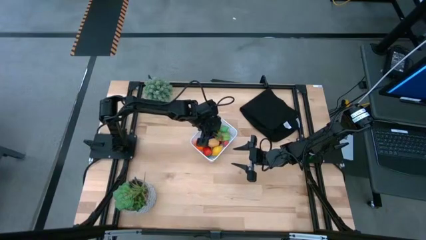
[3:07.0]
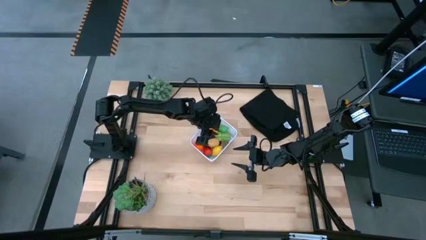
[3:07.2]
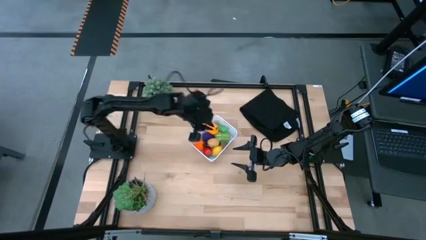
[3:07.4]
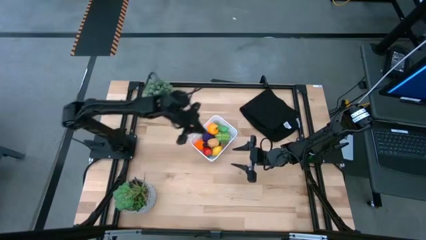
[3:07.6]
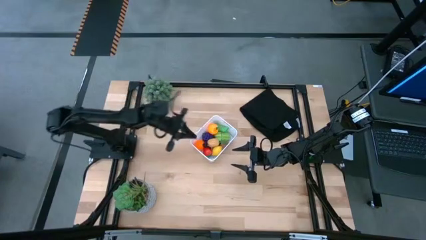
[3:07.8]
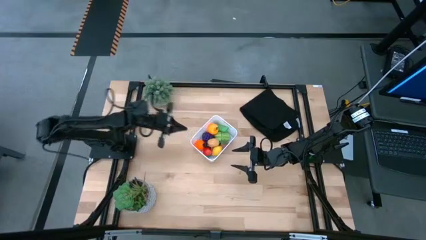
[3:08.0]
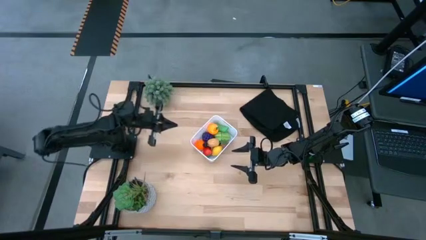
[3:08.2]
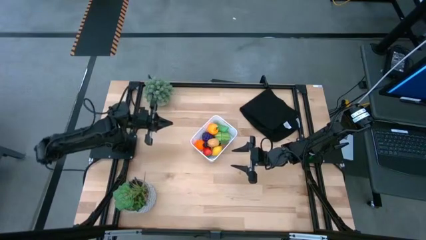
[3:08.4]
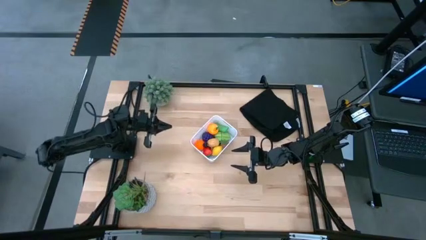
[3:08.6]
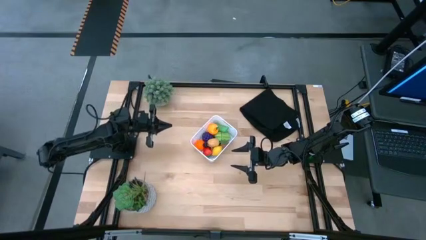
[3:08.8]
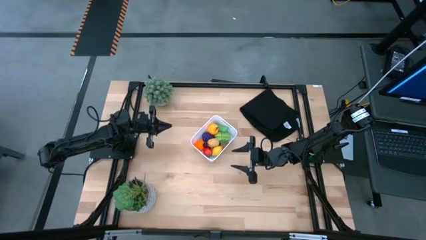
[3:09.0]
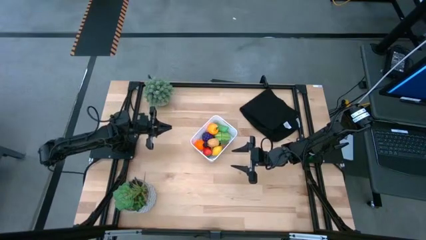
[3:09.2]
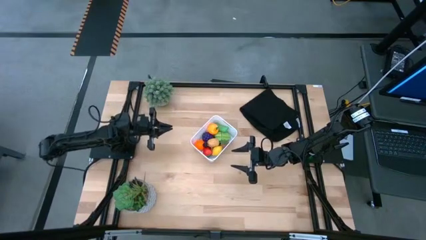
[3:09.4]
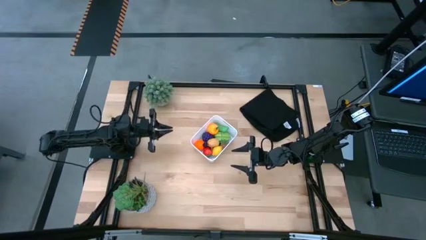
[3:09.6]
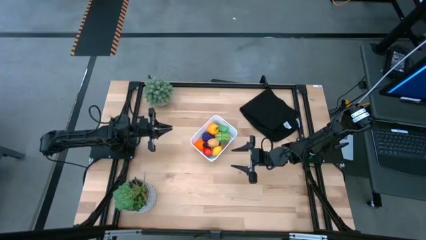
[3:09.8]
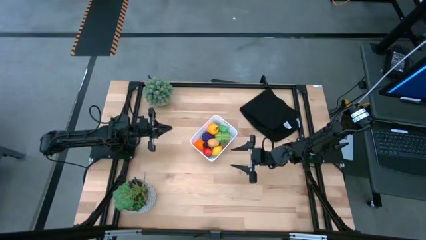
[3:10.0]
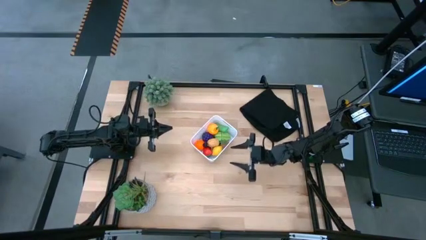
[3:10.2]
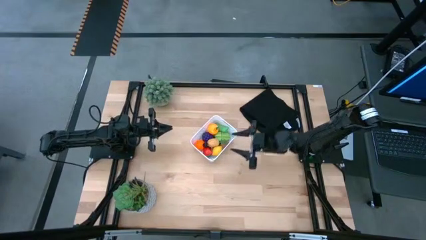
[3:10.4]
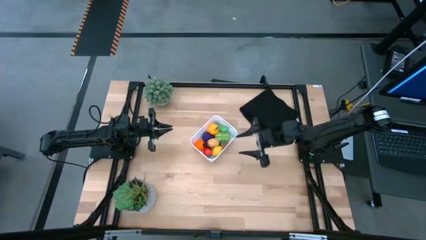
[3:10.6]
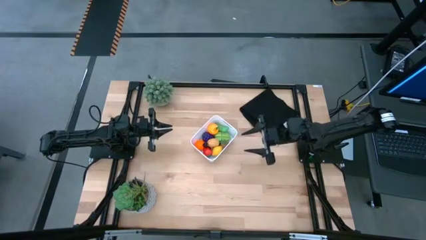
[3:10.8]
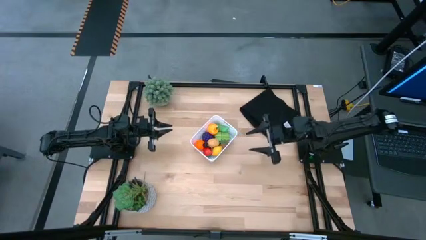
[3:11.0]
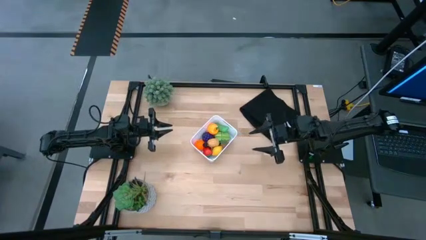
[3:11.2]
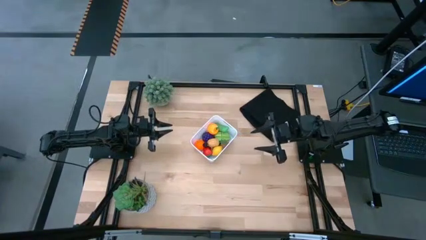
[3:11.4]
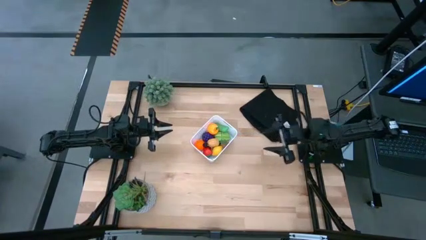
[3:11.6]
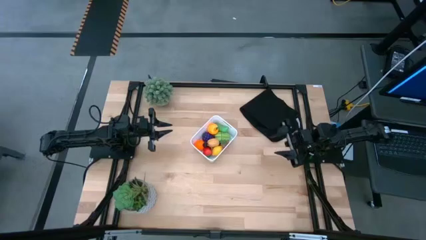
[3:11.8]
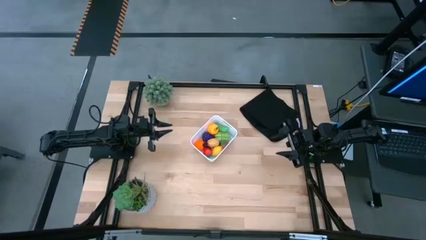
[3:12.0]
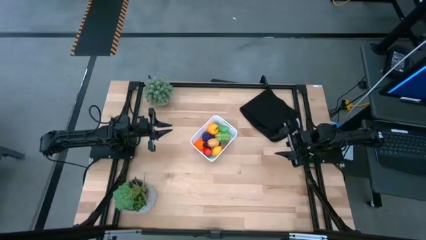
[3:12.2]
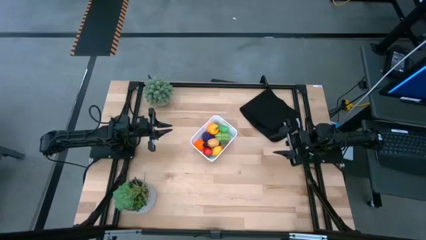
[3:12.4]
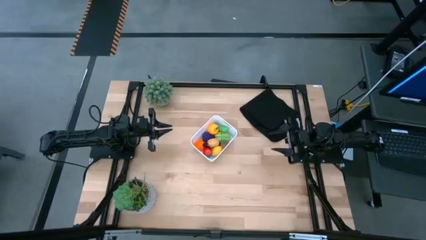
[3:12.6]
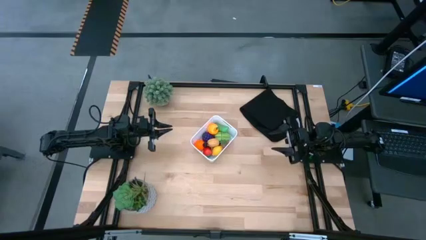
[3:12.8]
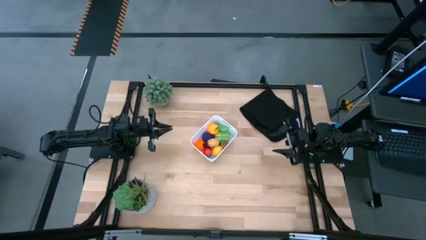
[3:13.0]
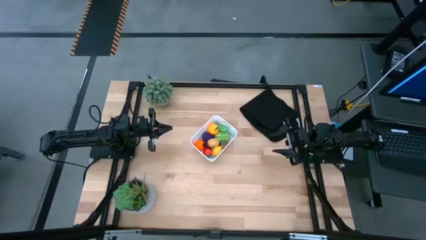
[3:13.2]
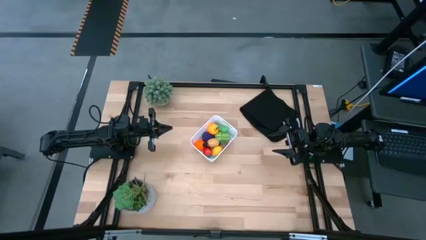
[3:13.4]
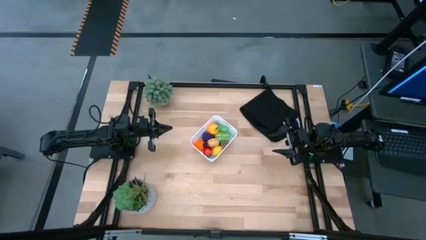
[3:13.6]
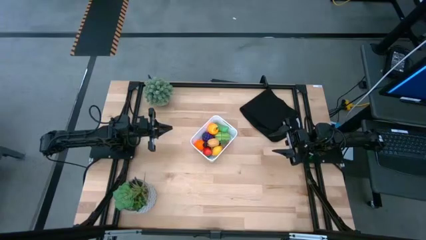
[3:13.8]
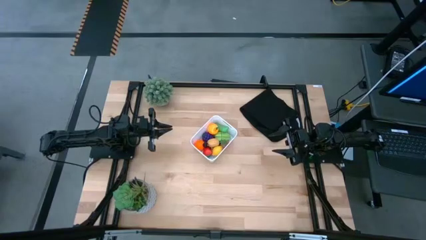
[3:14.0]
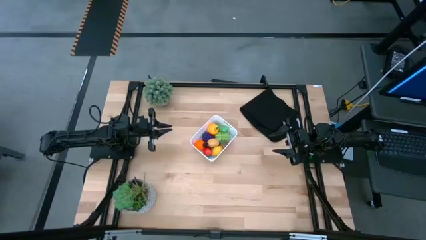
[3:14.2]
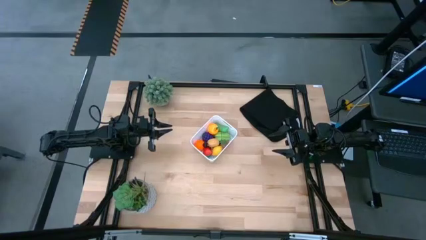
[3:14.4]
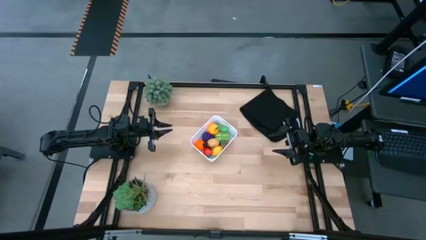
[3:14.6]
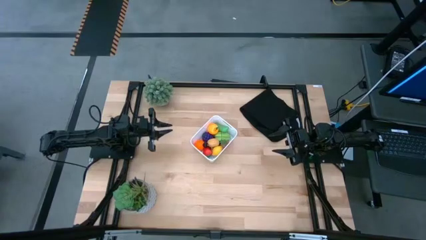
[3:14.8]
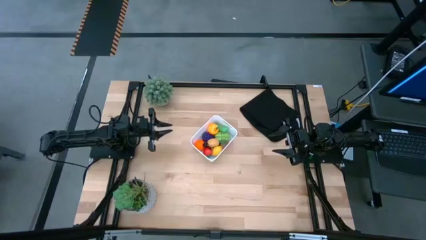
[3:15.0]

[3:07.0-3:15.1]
Task: Pick and placing Produce into tupperware
Return to Home Position

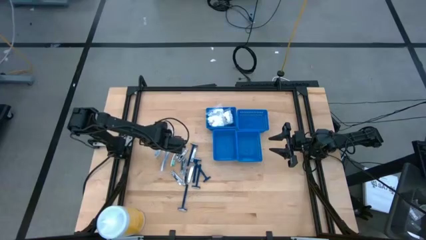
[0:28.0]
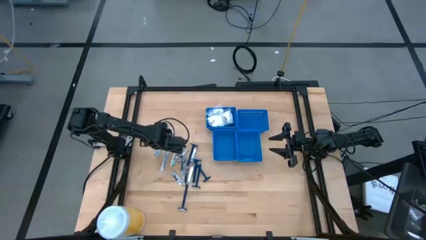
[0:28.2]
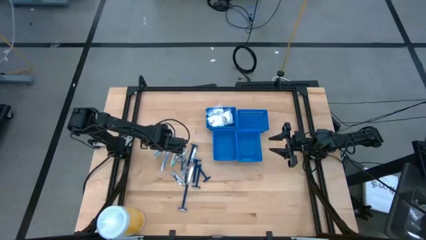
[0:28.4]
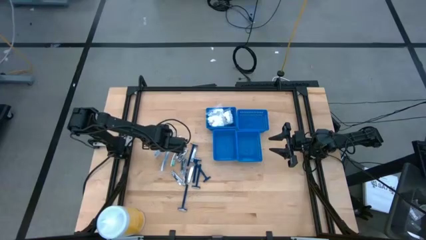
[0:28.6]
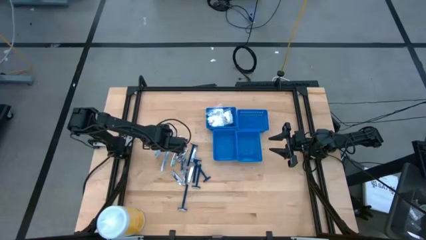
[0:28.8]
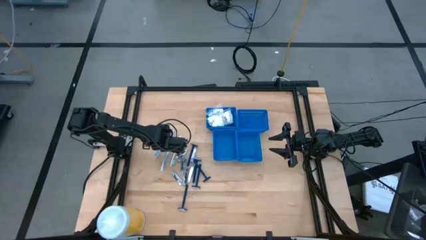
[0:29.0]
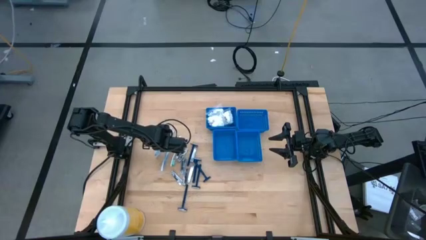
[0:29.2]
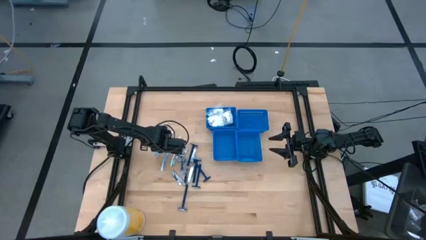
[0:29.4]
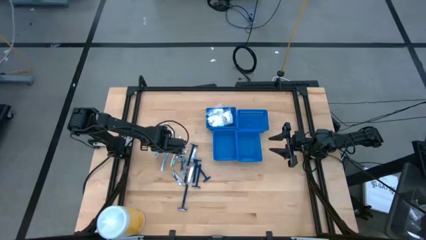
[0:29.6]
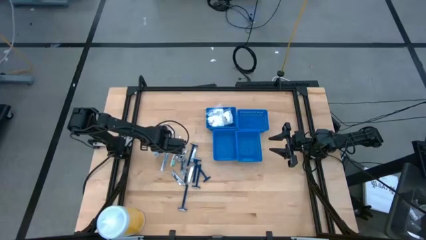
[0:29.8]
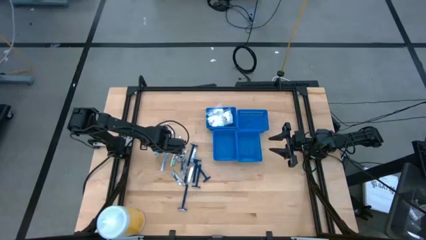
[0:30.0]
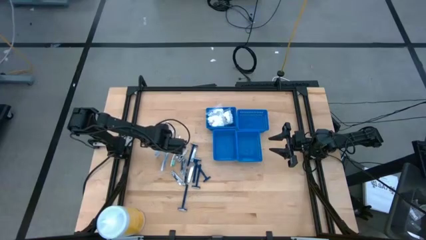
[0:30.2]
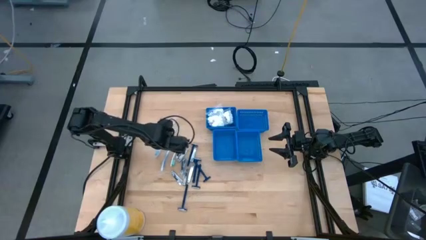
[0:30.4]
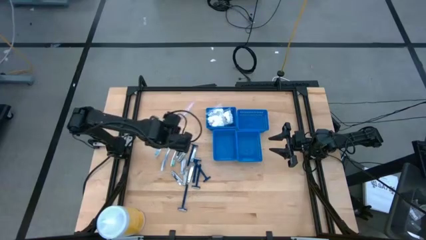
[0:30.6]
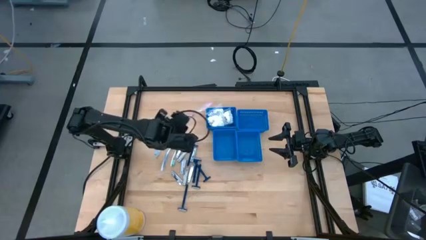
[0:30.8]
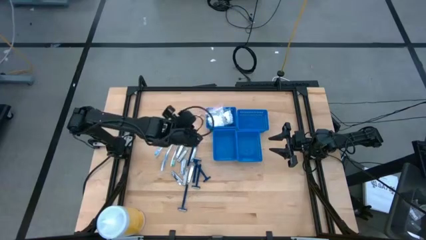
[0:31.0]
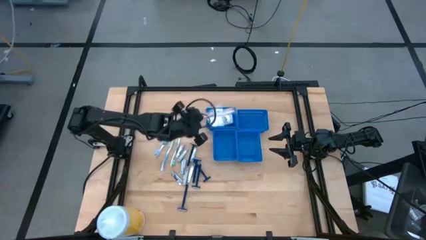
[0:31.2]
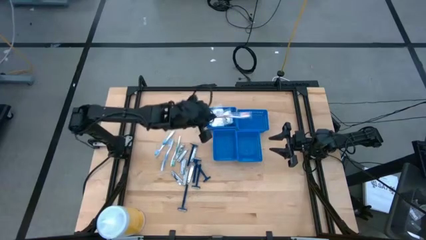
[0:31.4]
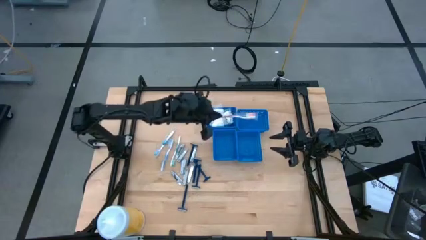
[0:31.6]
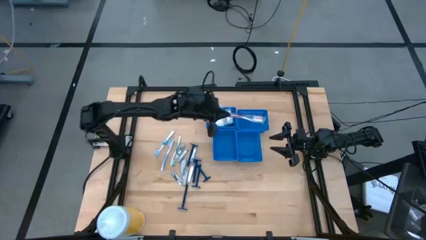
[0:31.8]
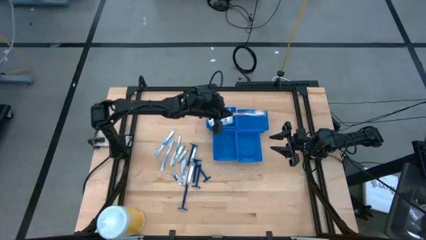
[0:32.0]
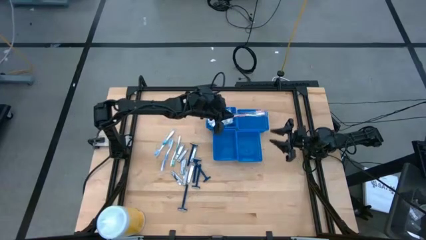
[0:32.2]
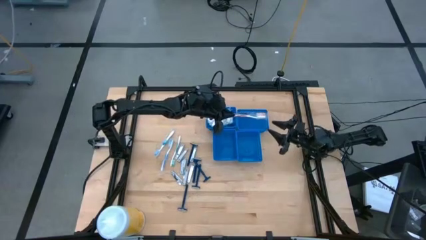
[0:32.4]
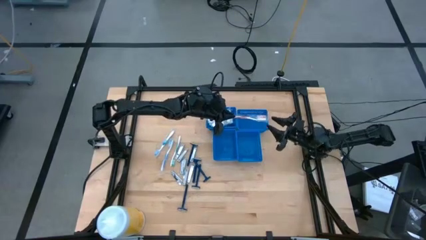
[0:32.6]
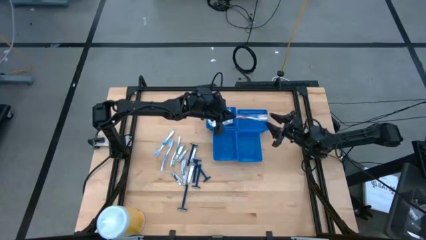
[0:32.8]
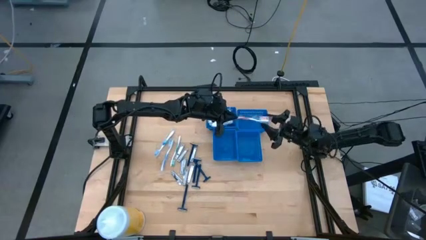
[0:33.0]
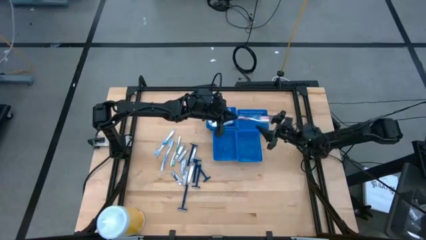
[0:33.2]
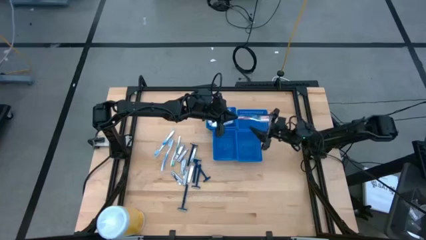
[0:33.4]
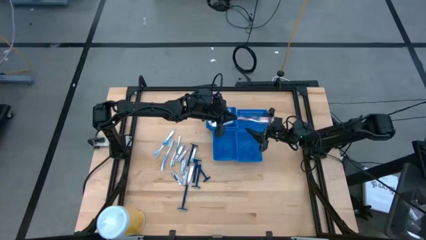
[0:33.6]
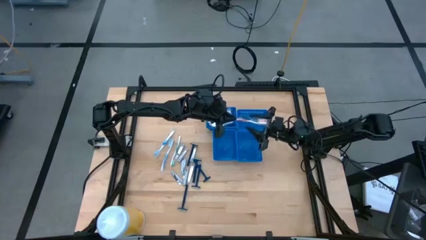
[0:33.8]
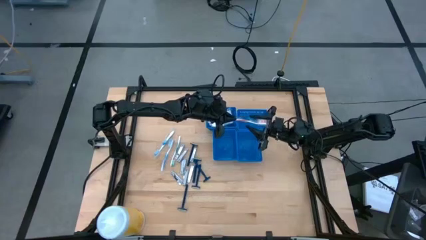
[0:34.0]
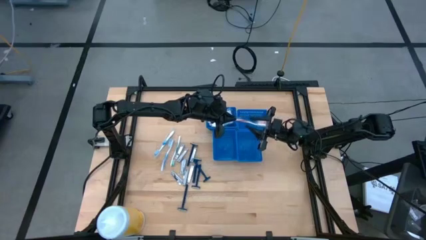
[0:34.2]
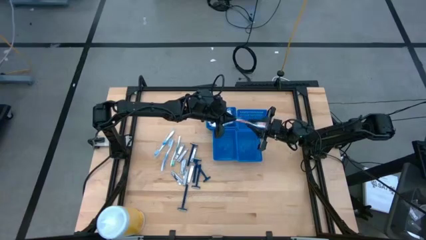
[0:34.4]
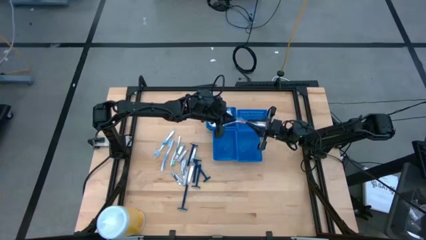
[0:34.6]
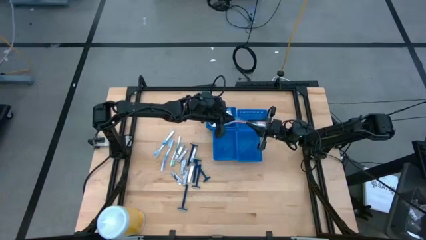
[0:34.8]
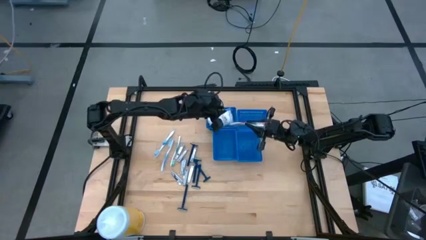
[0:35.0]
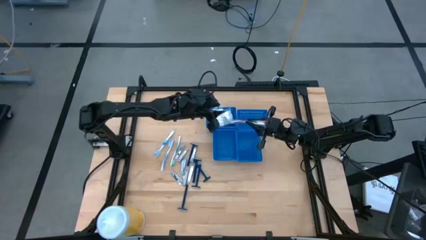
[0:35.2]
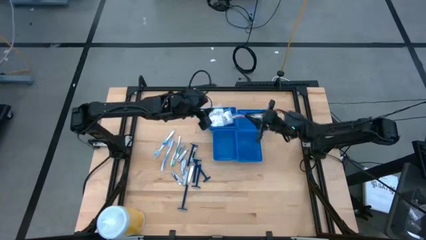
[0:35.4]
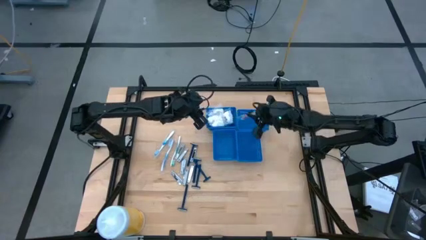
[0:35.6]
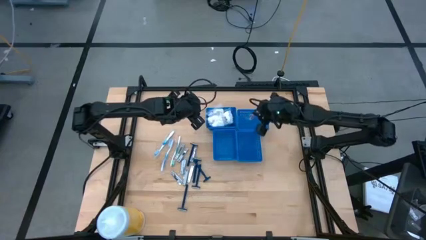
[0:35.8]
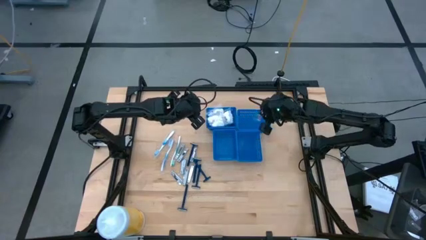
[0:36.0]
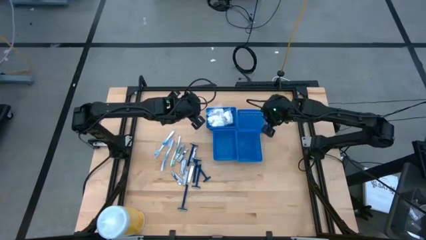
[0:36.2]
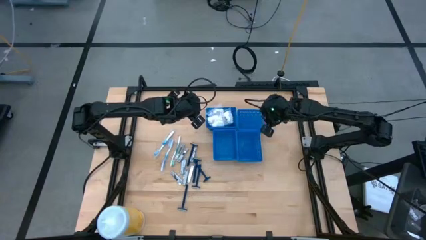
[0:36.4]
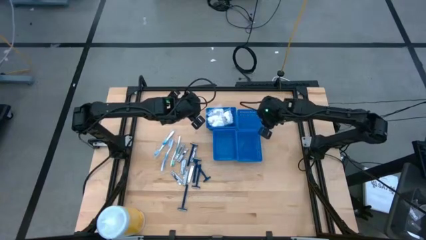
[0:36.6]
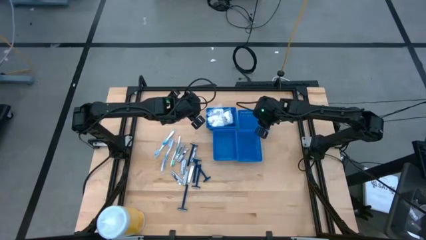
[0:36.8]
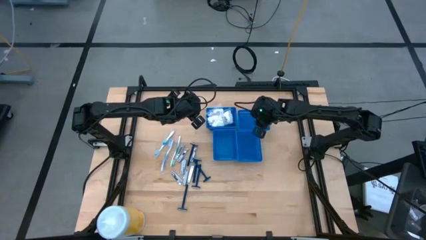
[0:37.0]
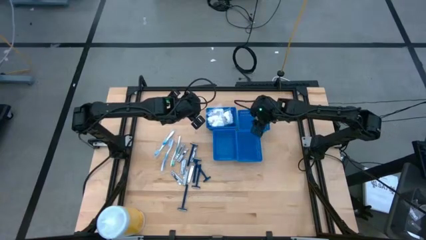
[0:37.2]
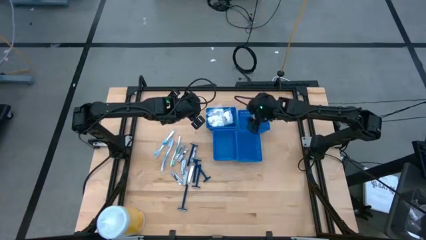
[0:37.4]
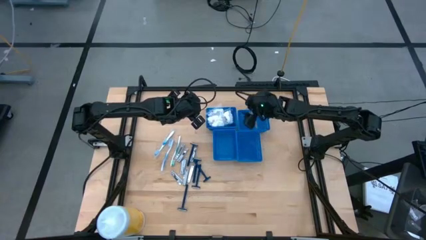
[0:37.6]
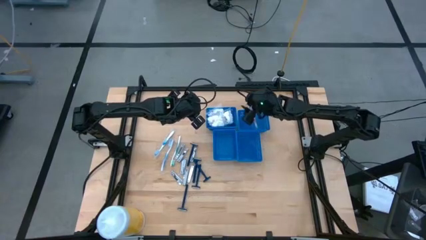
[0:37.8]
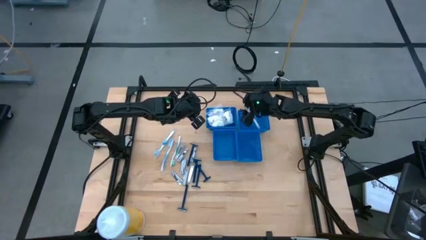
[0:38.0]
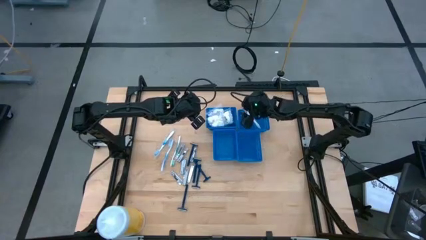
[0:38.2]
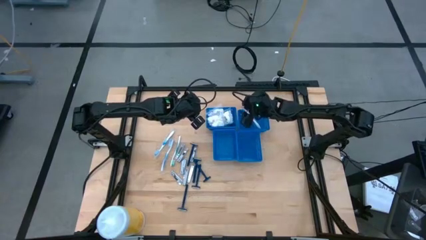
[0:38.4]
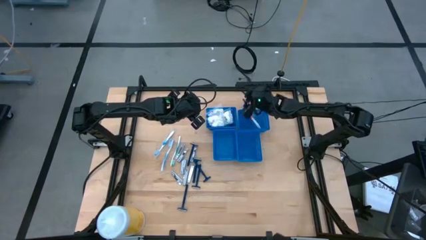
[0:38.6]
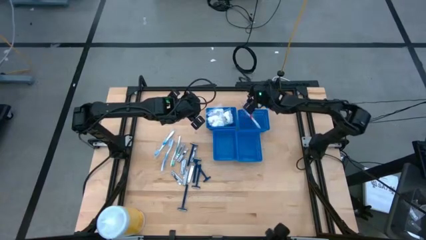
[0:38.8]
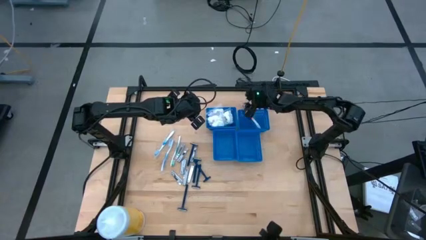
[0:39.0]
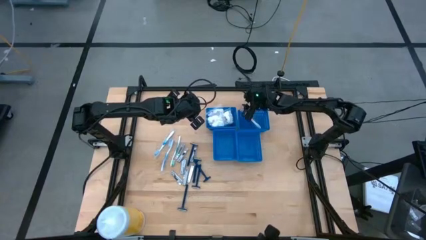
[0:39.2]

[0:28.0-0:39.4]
Task: Pick & Place Travel size toiletries
Put the orange toothbrush into the top right blue basket
